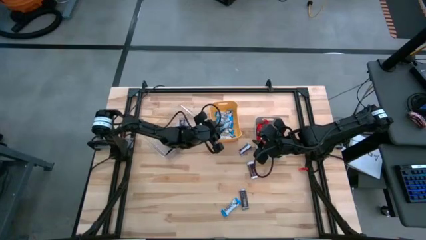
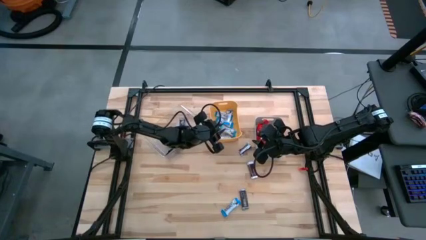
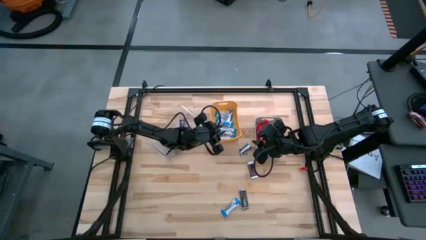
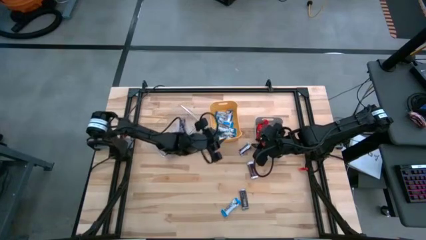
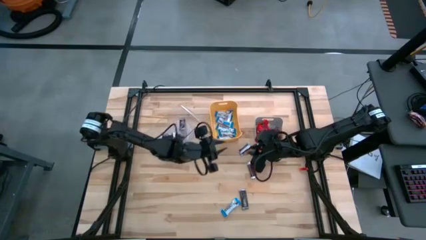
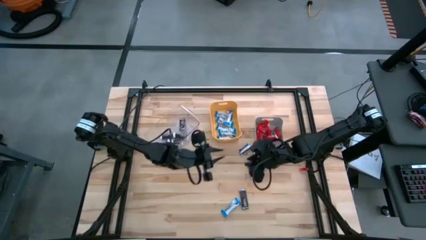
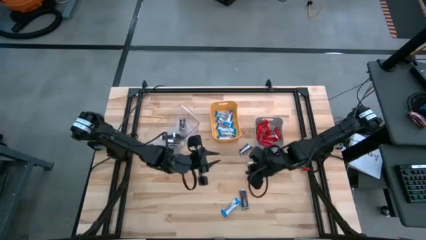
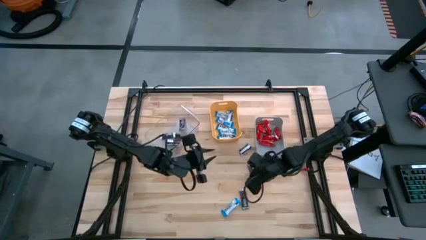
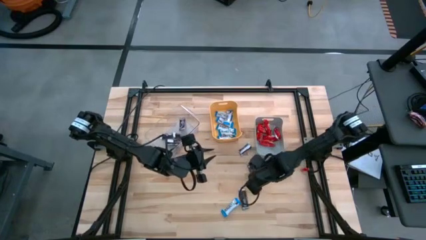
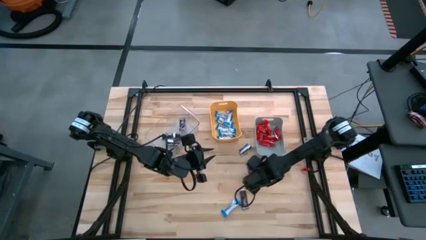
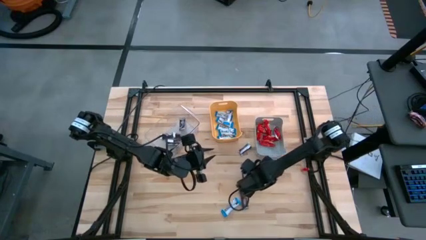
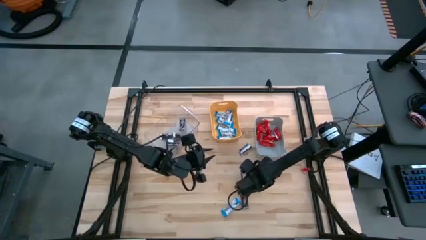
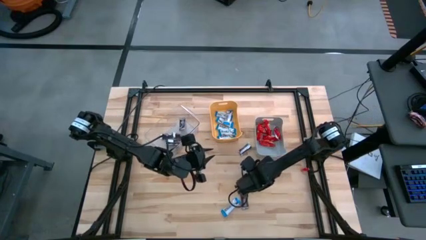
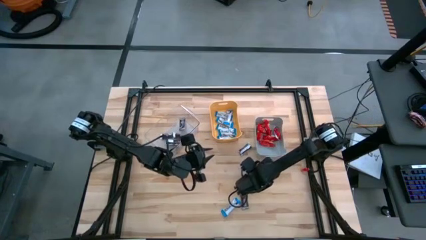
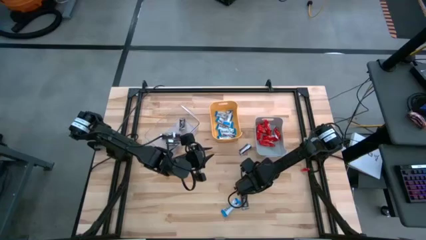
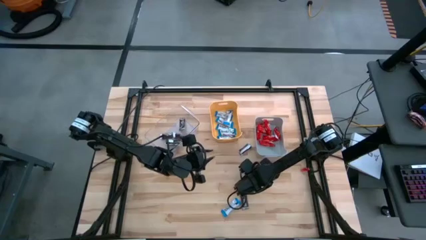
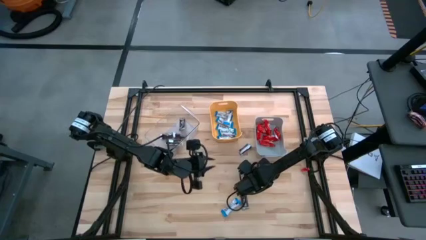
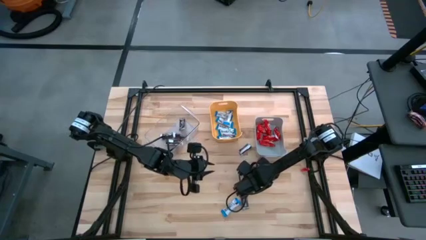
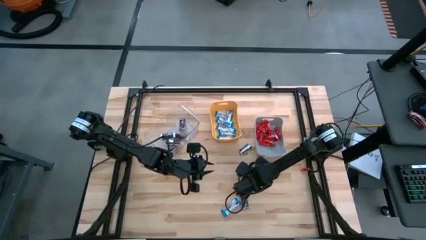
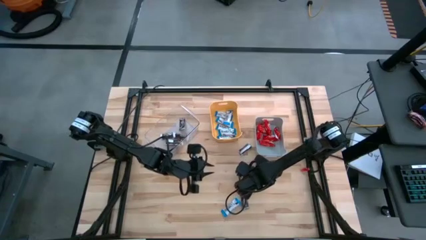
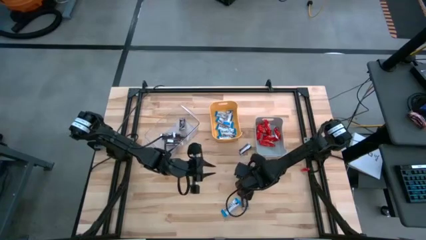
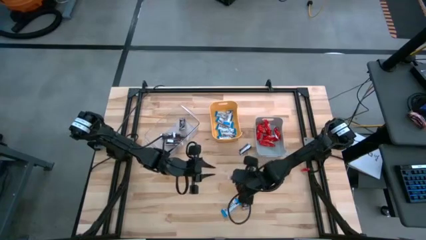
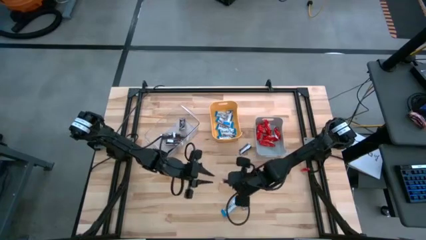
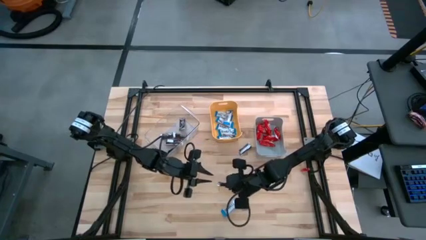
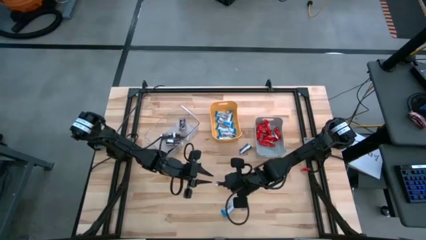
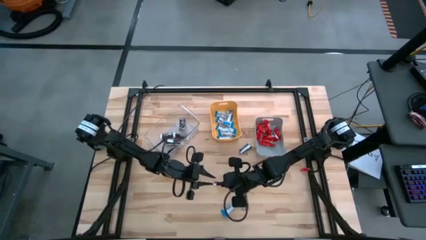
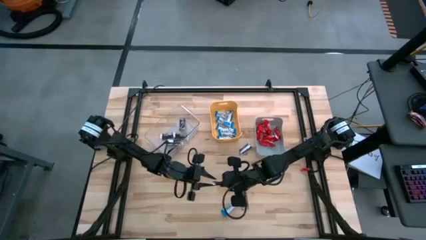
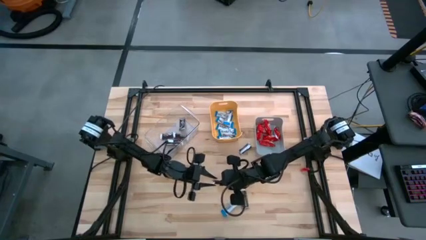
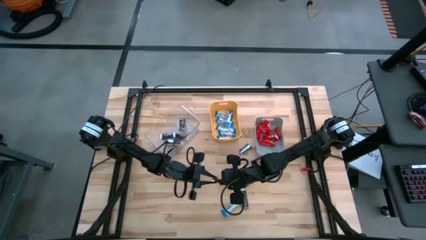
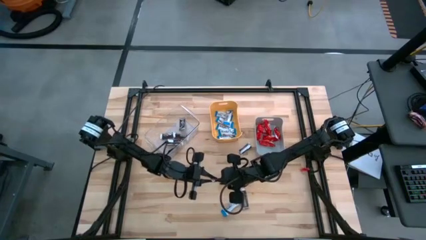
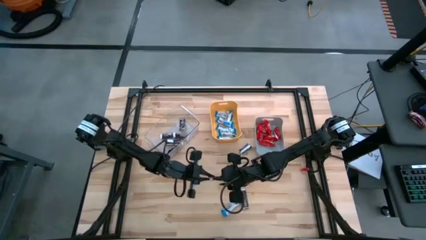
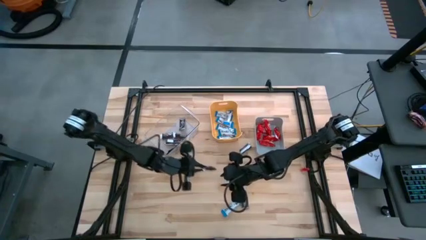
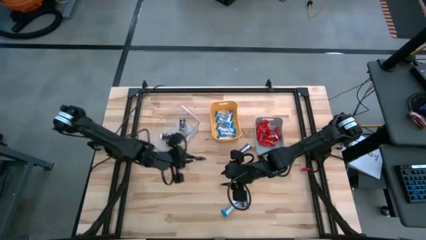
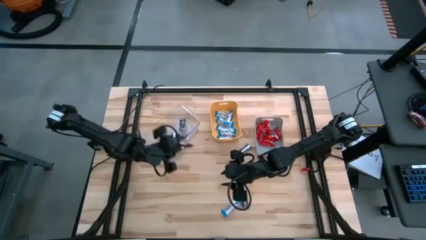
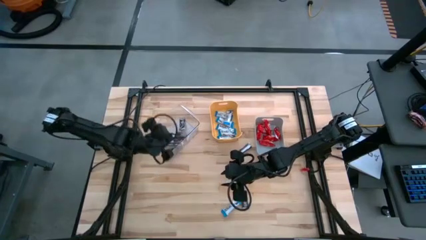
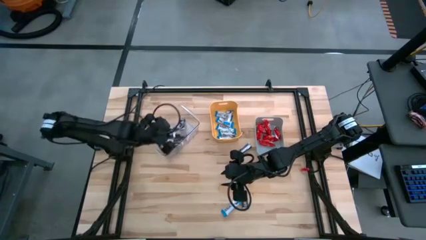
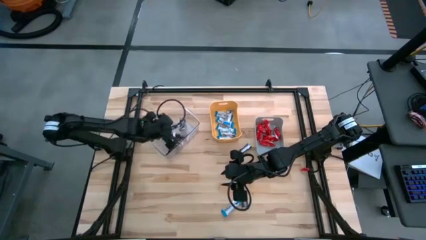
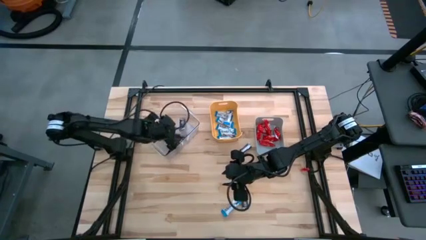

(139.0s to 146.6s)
Task: Organize candy in baskets
Put the brown chocolate into the transparent bin

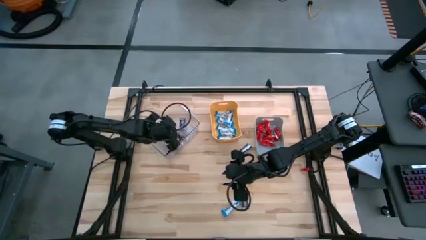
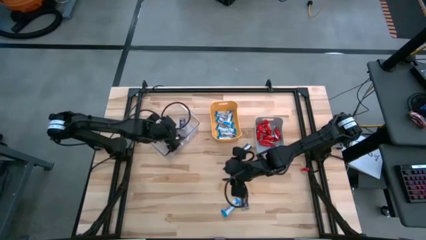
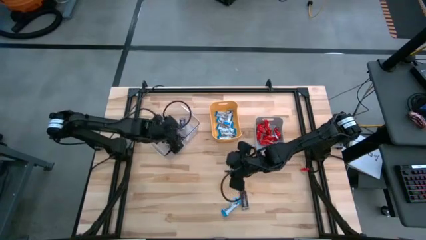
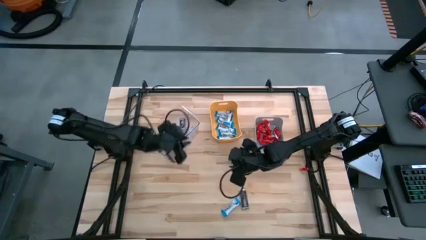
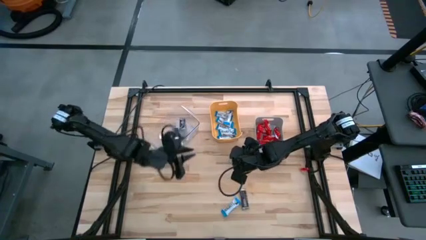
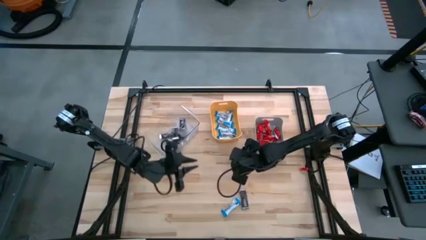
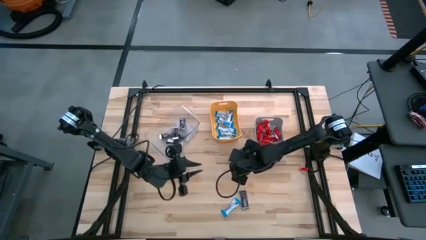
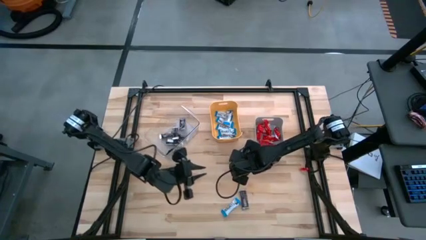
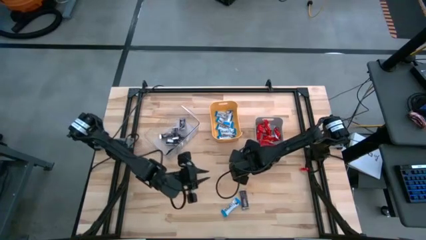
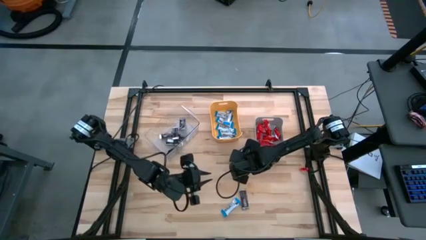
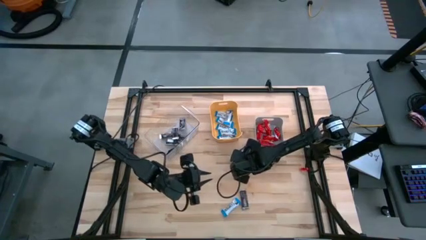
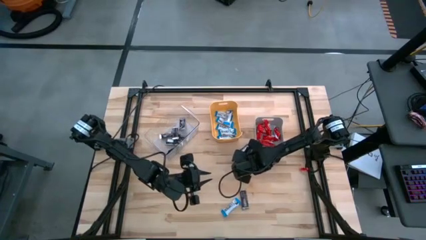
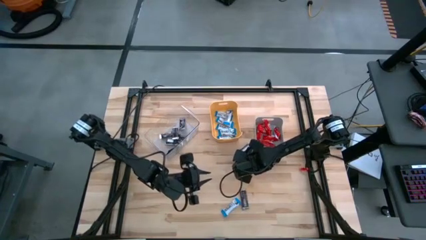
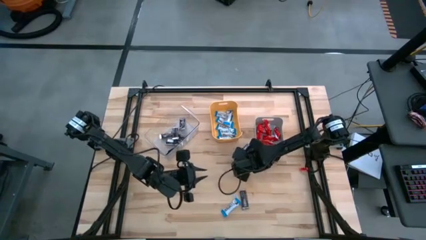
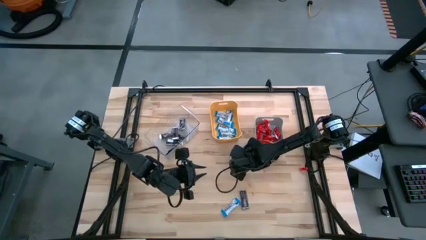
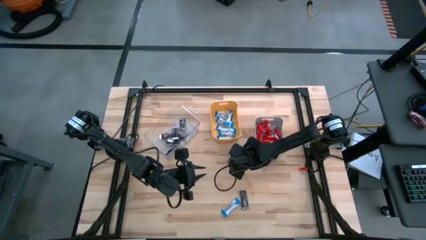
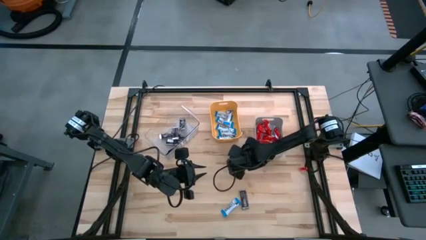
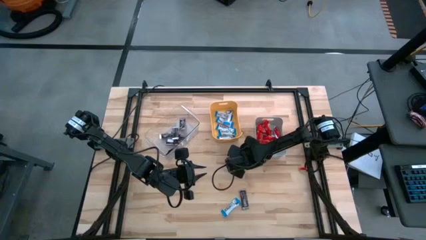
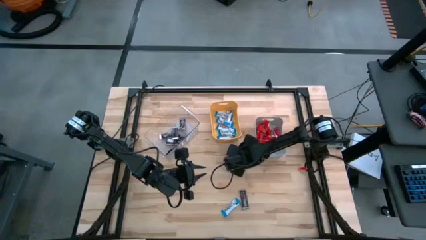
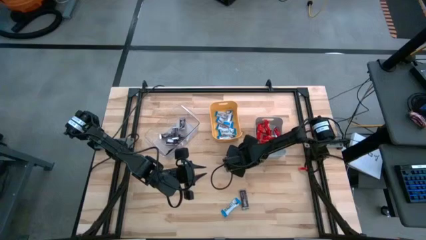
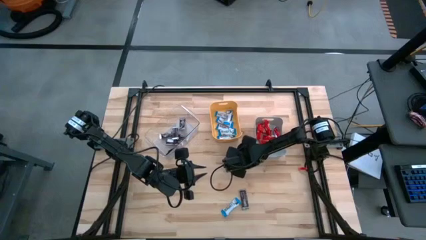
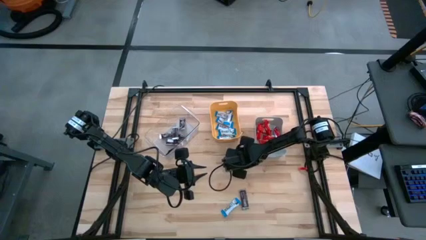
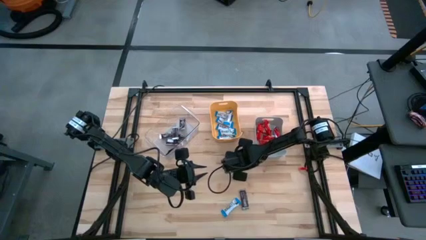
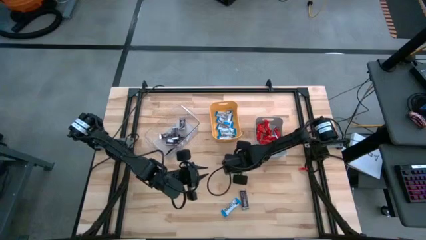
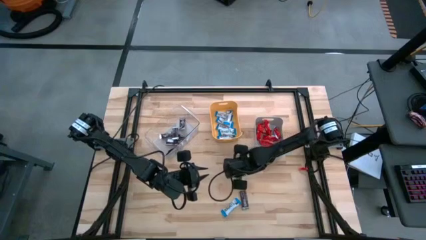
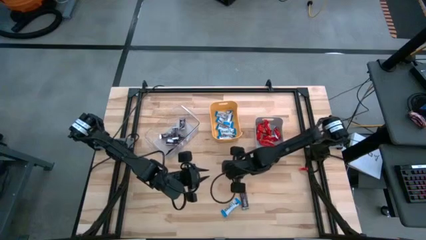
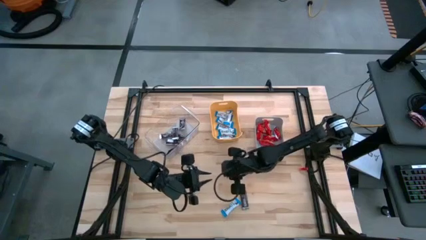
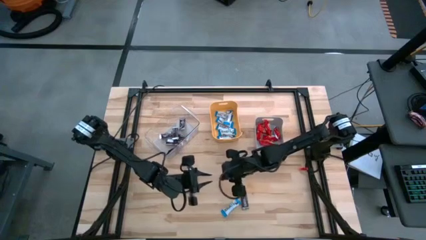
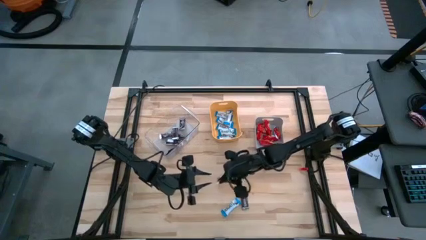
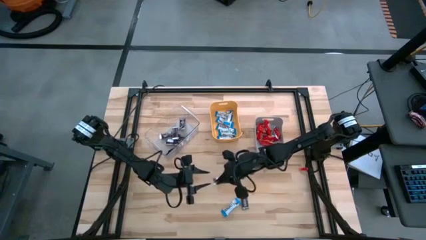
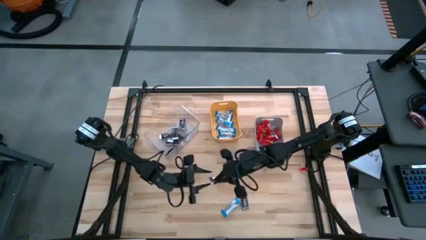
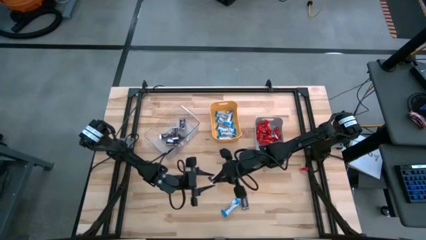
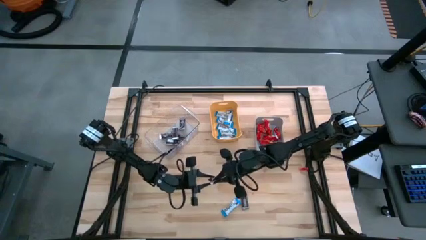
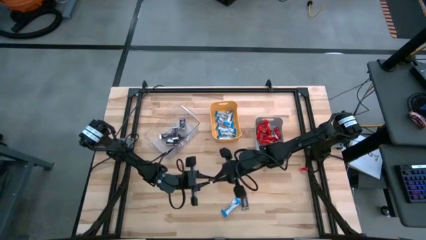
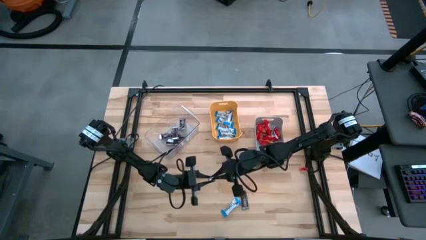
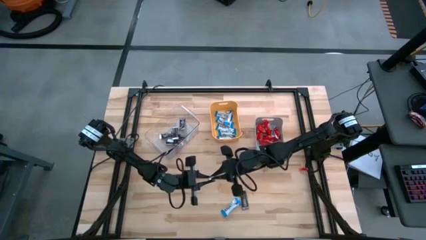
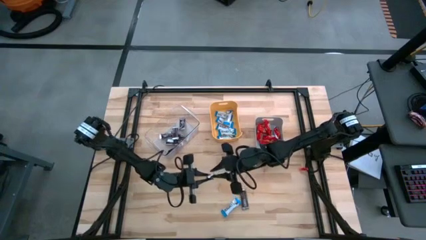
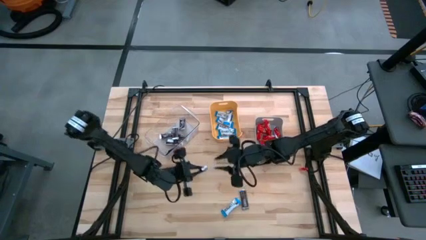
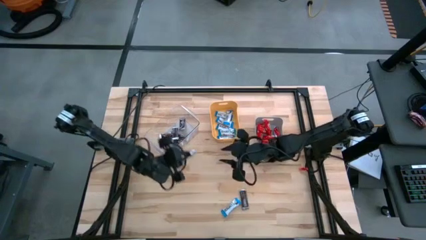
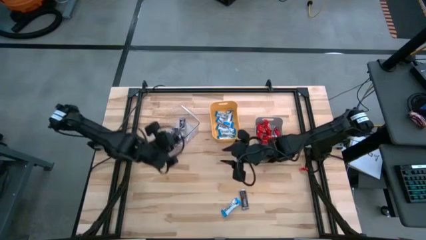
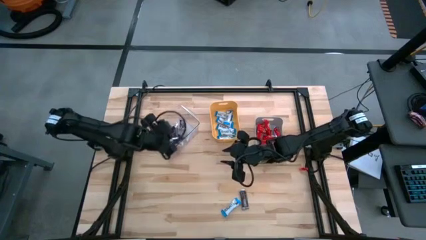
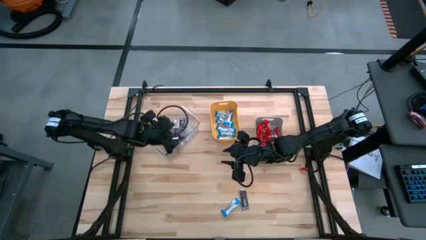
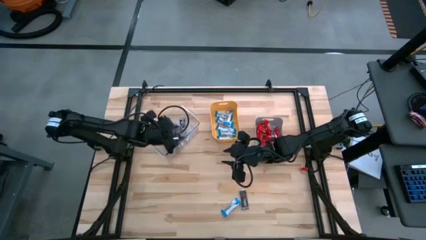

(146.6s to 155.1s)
Put the brown chocolate into the transparent bin

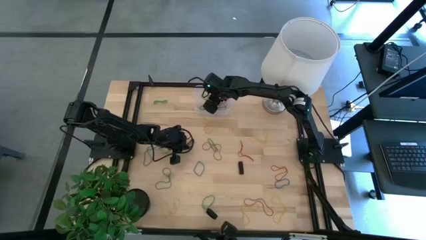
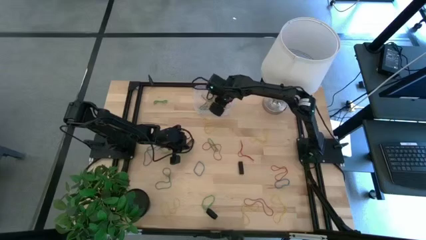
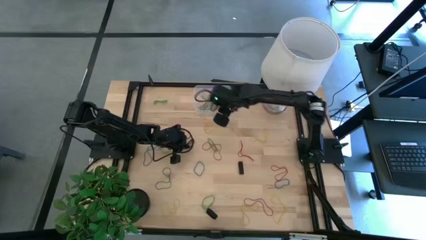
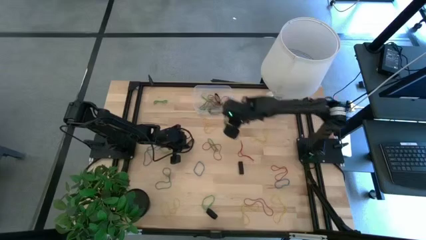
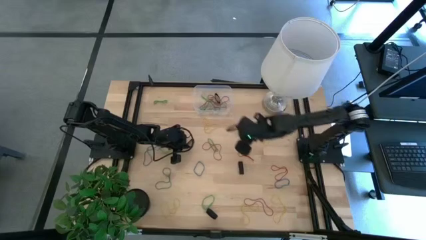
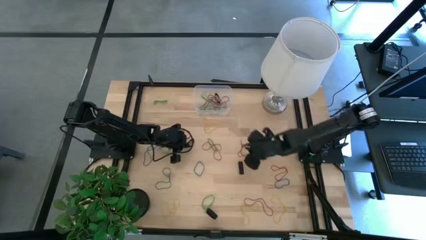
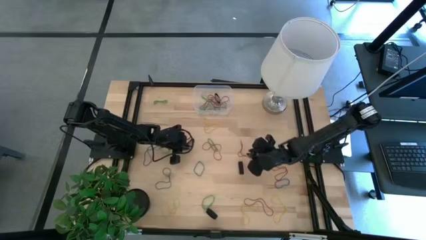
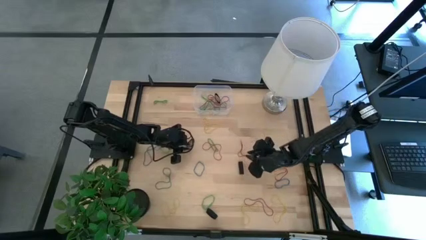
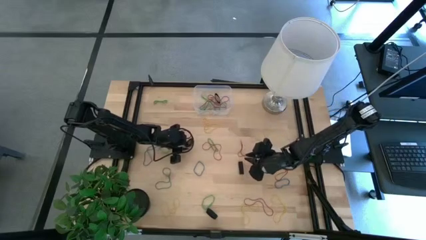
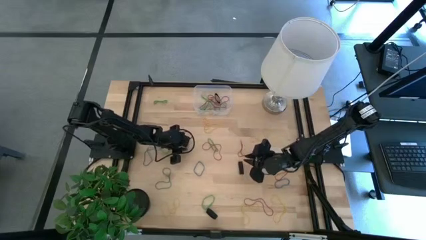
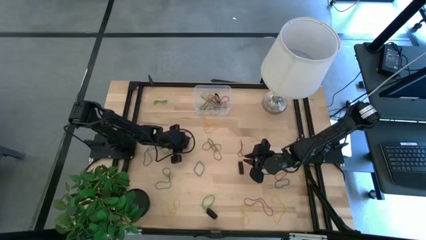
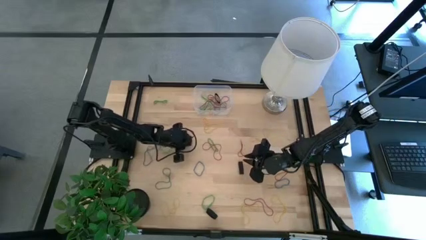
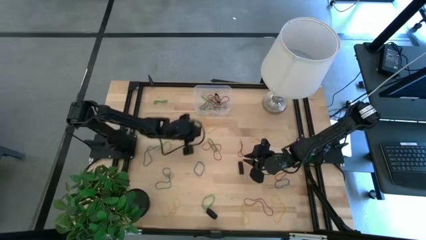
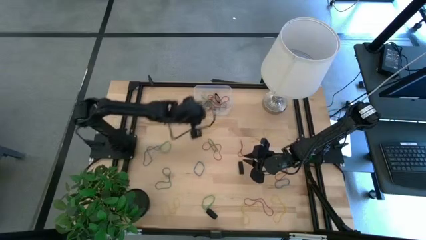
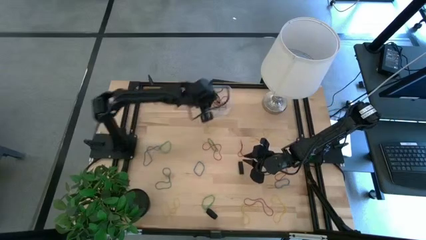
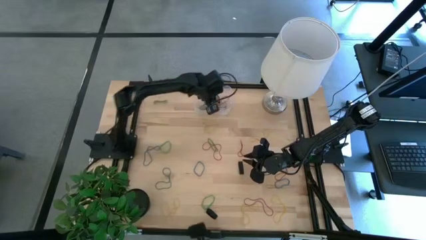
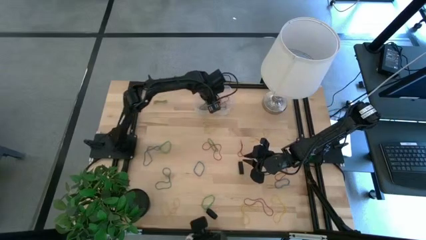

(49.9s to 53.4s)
Task: Pick and place rubber bands into bin
Put the black rubber band into the transparent bin
